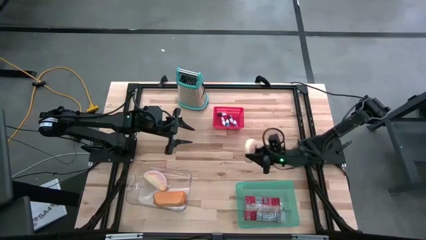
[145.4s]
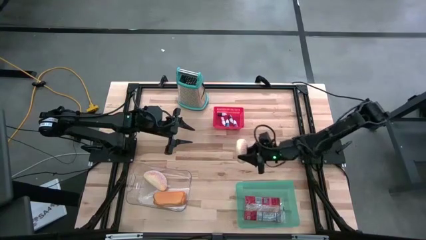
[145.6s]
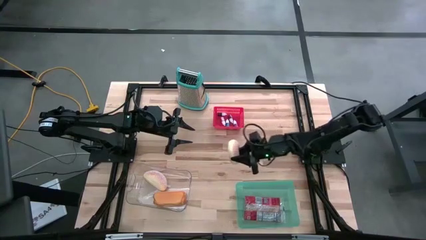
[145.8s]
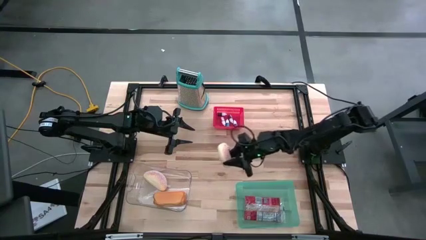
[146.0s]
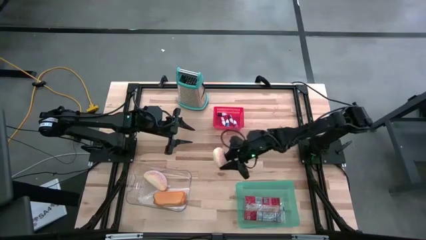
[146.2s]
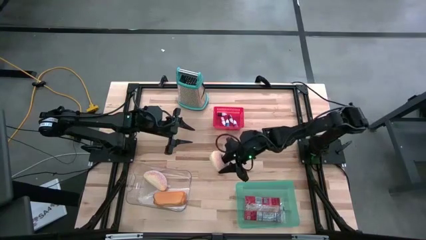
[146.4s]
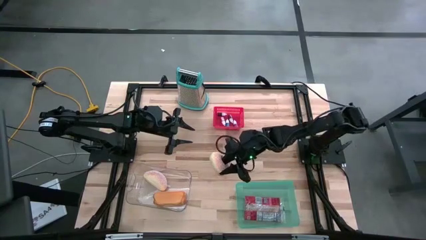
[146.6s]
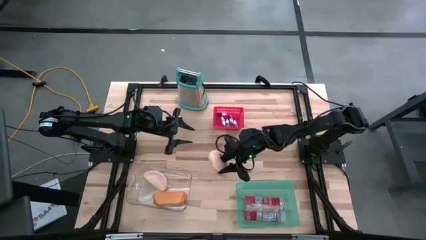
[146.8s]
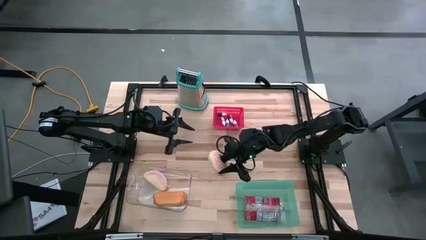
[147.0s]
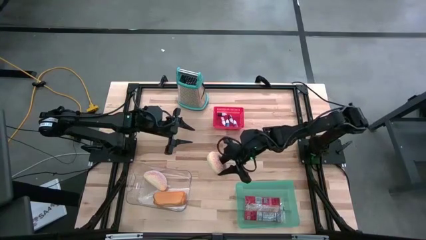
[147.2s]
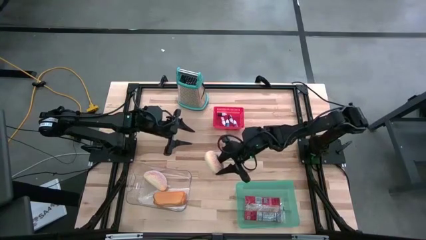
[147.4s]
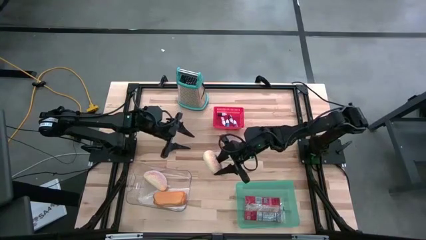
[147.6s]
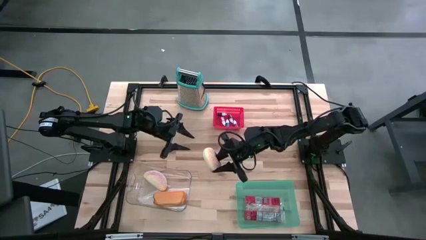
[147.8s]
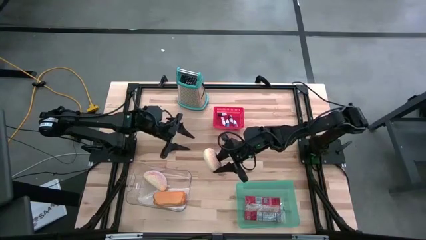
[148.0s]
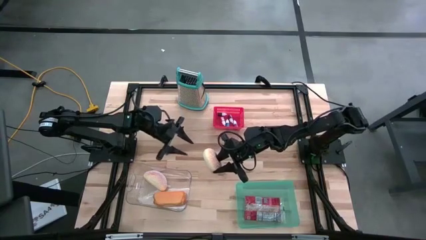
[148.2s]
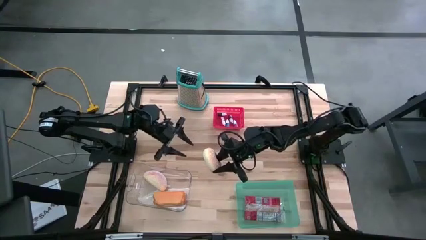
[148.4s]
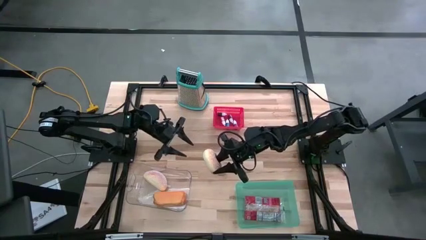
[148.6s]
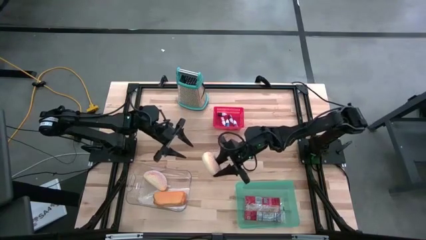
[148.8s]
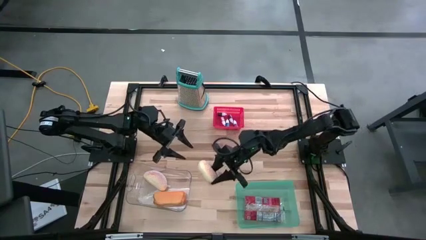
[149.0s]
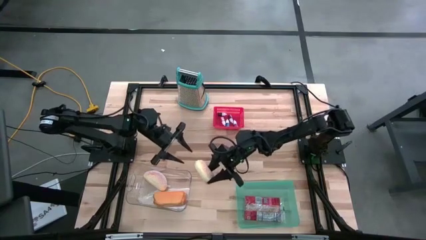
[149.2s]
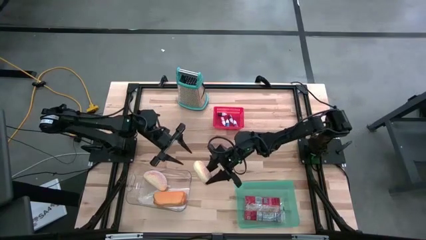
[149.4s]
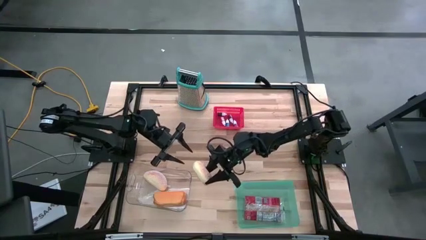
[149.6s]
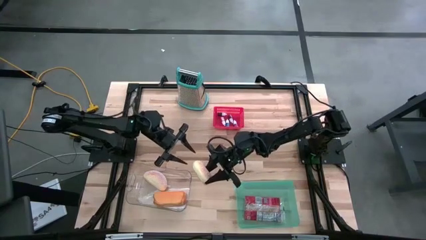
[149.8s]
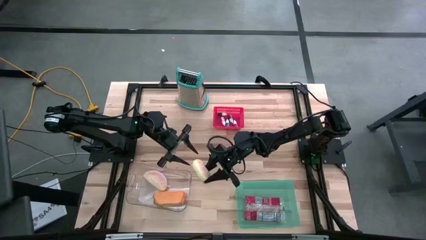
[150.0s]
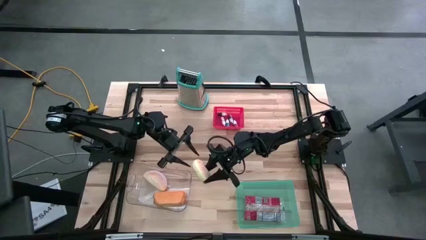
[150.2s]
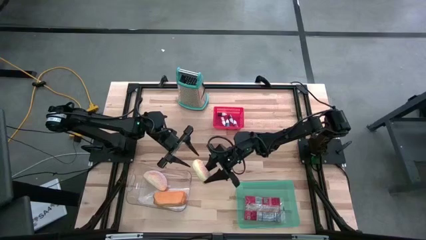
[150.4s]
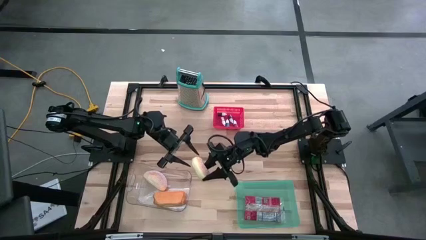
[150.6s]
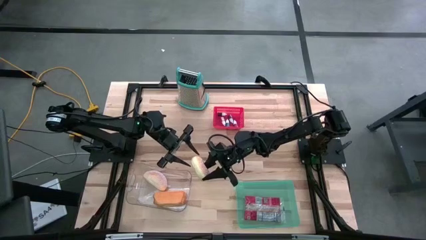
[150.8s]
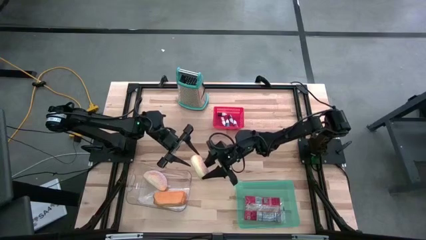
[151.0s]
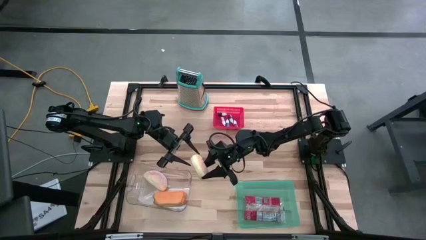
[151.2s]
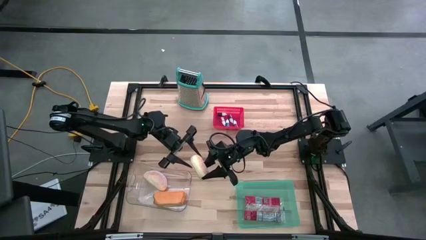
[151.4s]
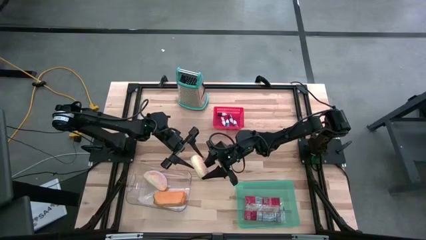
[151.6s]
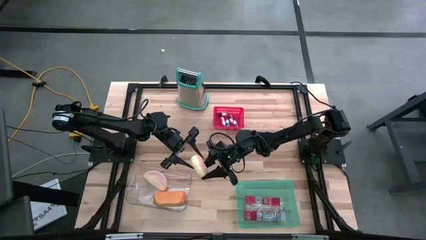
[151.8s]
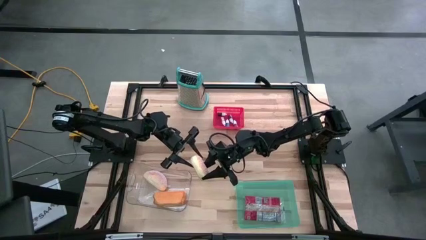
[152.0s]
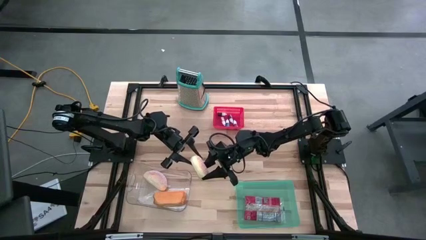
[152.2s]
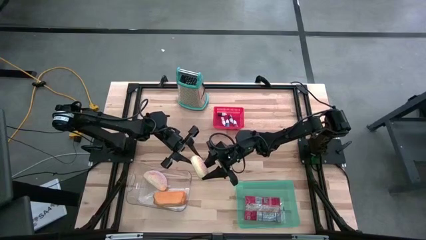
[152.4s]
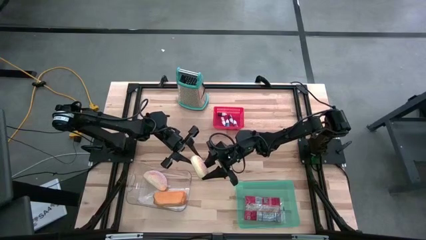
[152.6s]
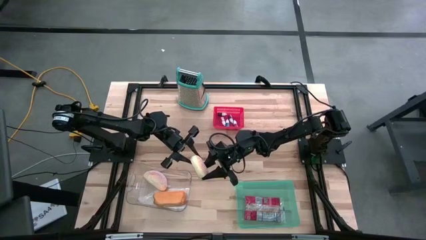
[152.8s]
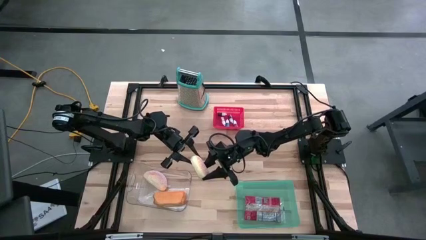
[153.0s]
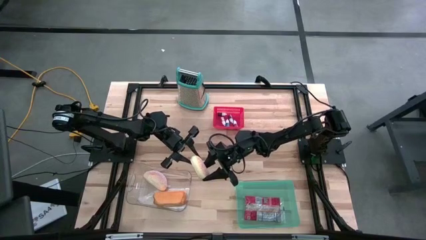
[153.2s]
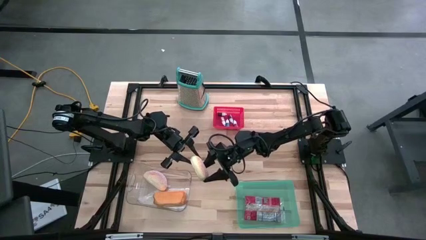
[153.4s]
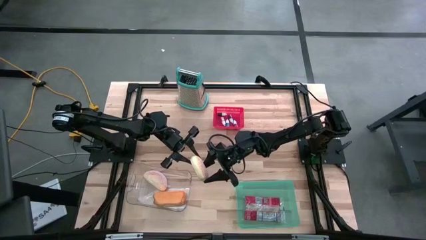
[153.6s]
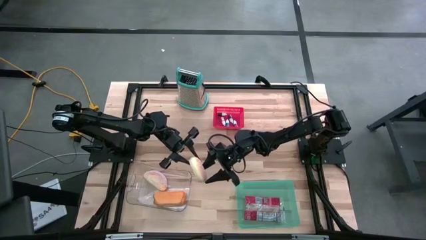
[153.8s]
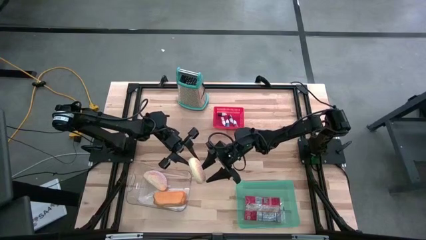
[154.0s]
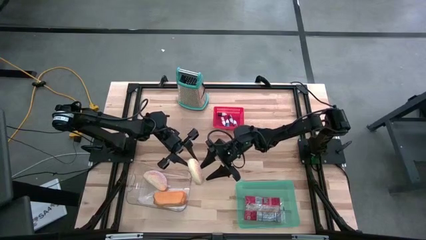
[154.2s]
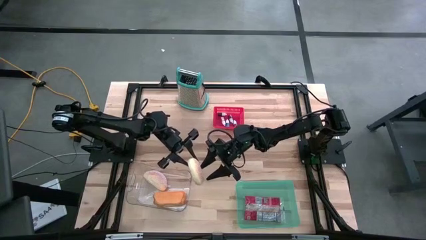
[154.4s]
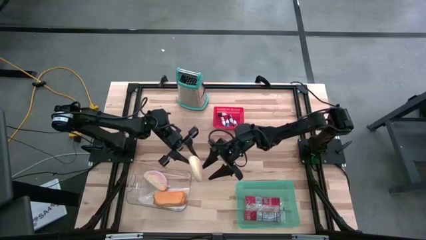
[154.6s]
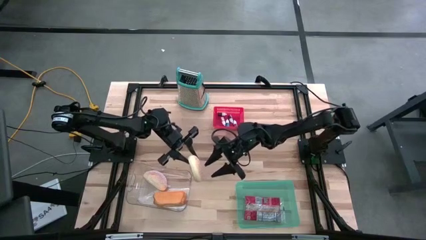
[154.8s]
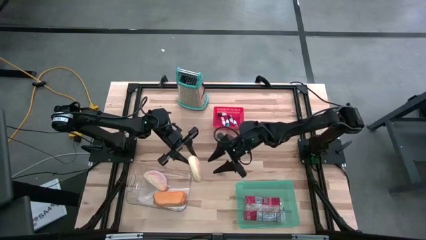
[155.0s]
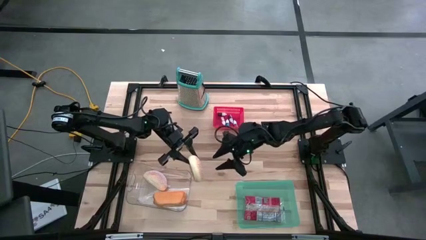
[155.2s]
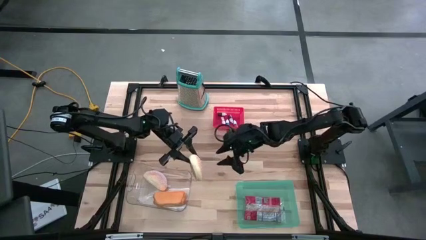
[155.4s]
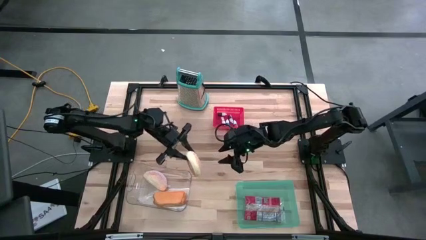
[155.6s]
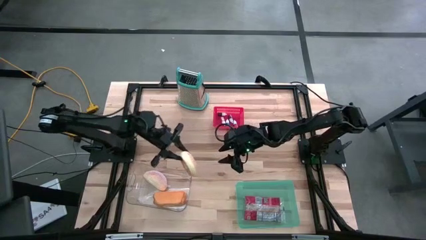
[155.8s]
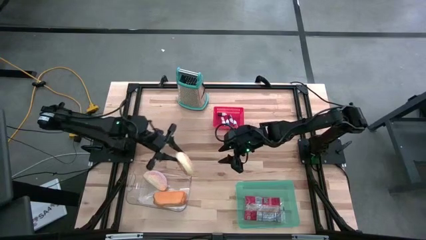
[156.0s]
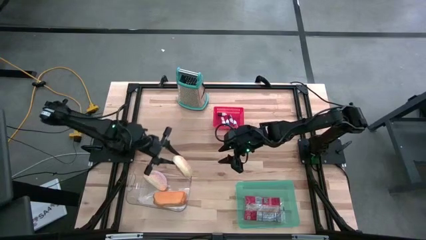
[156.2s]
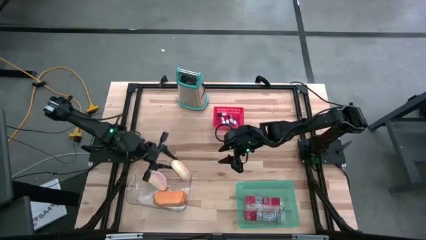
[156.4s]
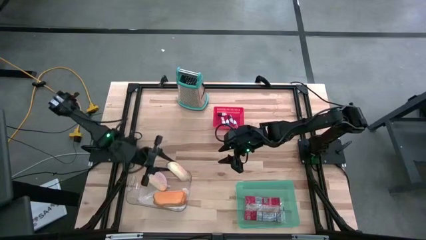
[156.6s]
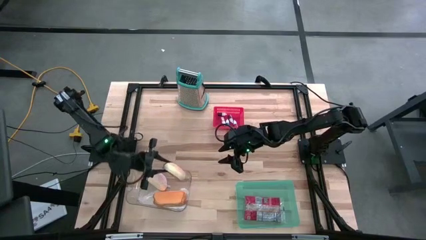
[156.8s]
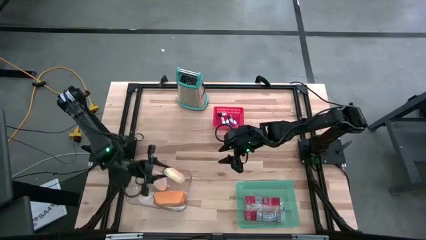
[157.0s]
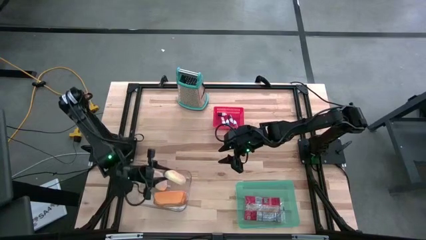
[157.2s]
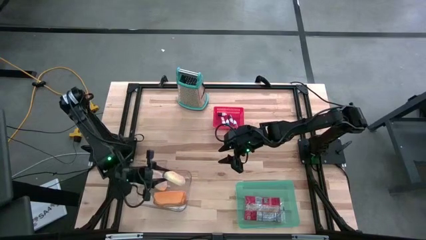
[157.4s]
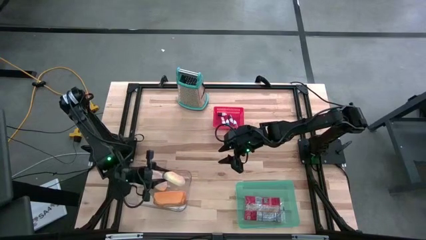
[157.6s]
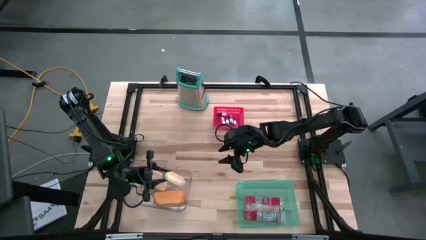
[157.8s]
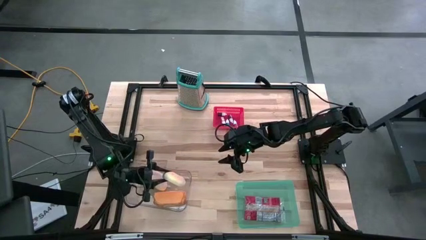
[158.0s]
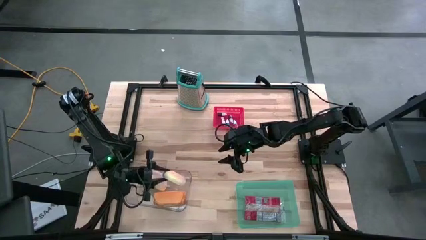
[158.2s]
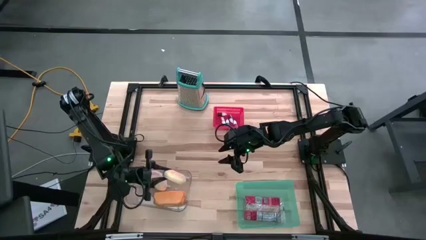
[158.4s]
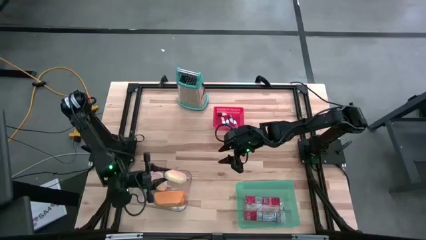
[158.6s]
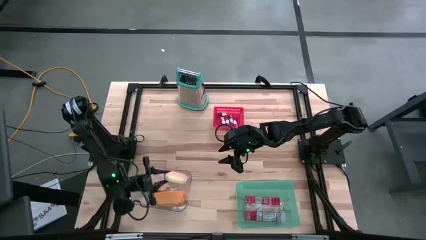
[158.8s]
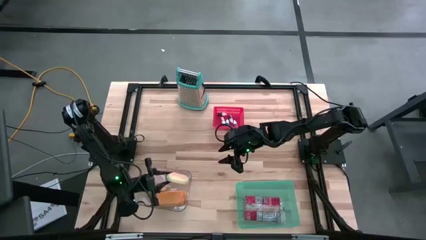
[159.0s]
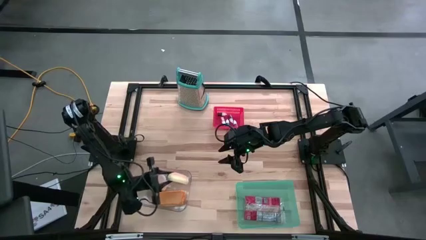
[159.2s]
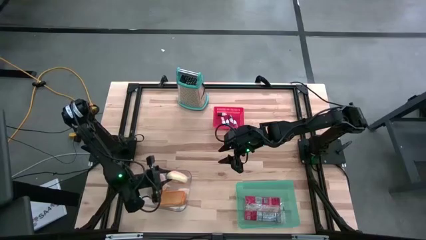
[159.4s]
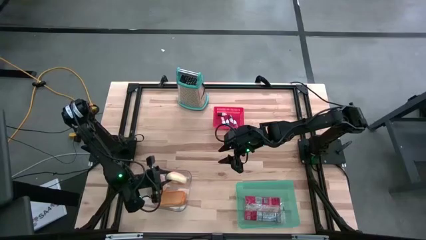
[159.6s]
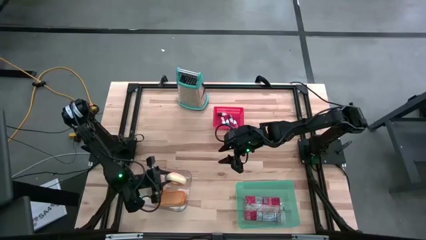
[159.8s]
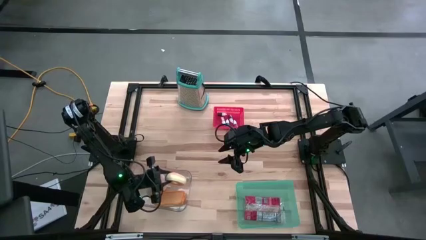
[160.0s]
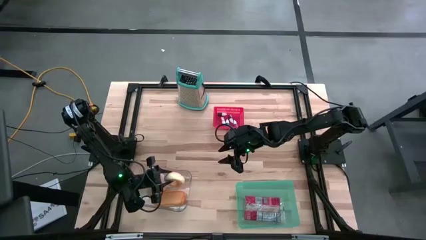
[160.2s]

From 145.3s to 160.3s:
Put the donut into the transparent bin
